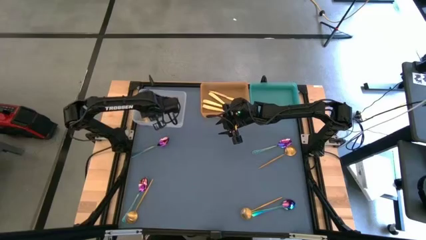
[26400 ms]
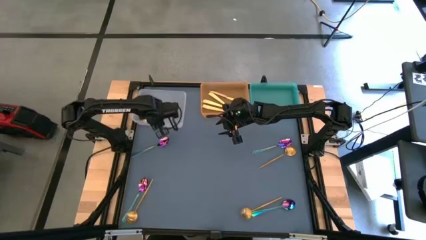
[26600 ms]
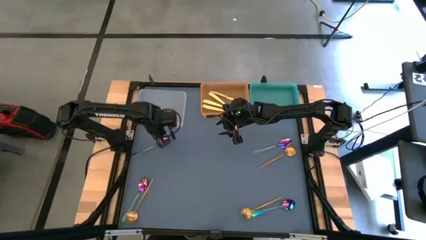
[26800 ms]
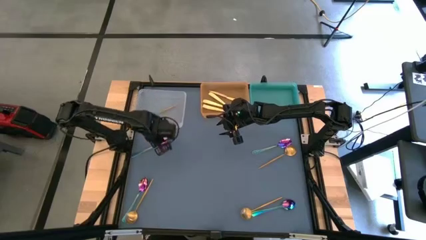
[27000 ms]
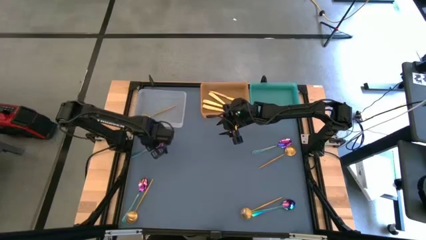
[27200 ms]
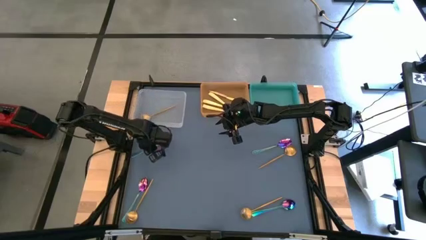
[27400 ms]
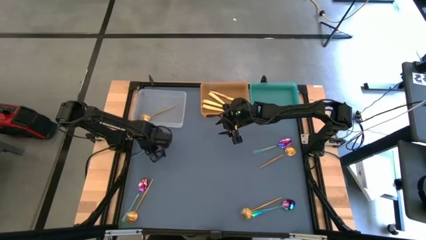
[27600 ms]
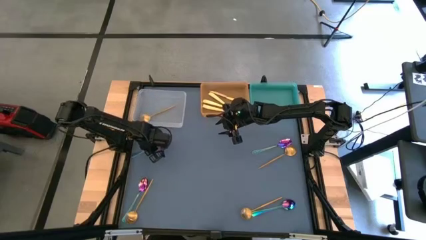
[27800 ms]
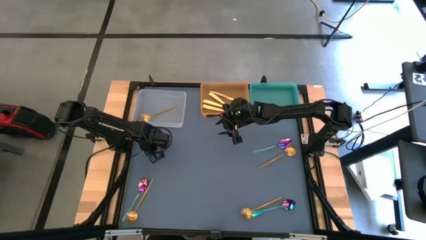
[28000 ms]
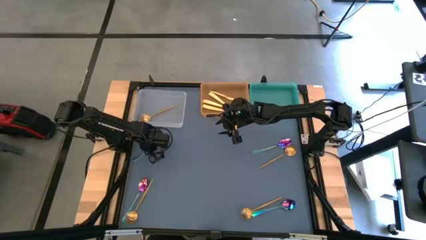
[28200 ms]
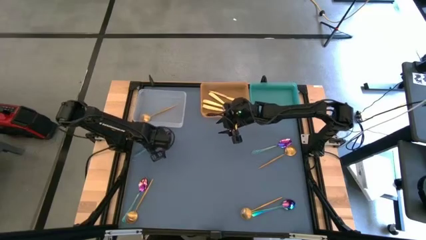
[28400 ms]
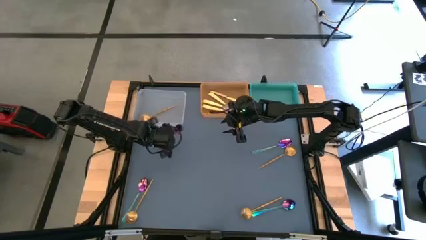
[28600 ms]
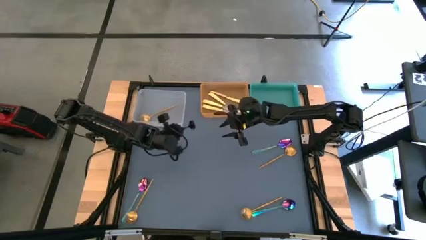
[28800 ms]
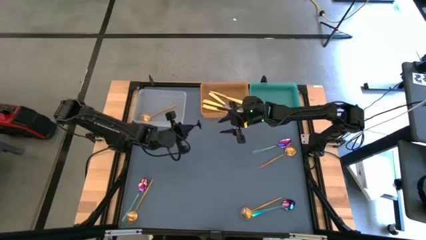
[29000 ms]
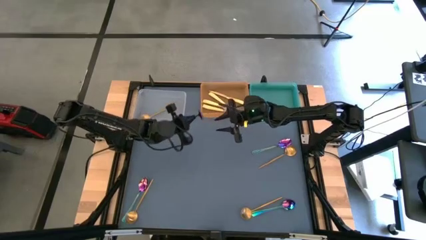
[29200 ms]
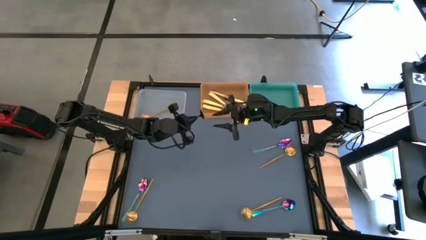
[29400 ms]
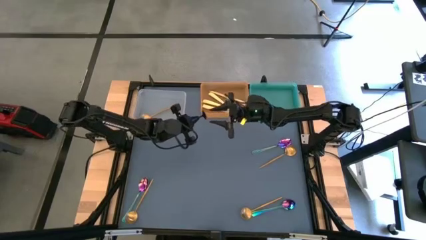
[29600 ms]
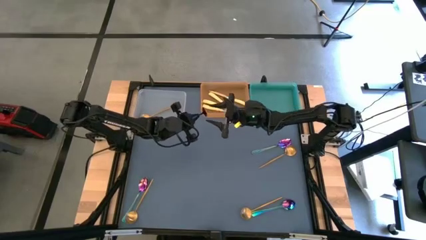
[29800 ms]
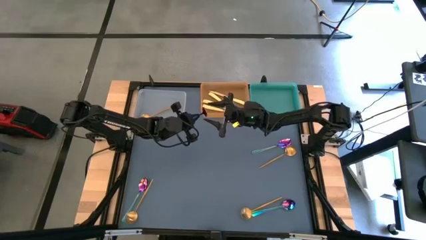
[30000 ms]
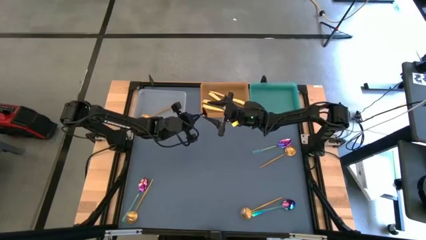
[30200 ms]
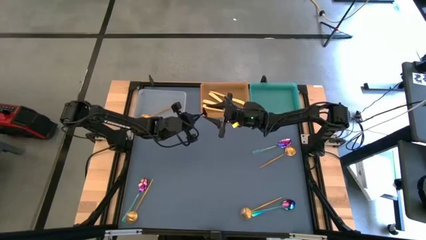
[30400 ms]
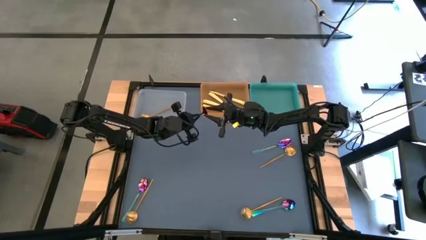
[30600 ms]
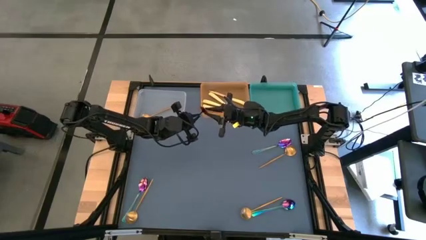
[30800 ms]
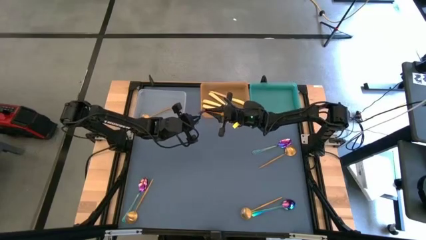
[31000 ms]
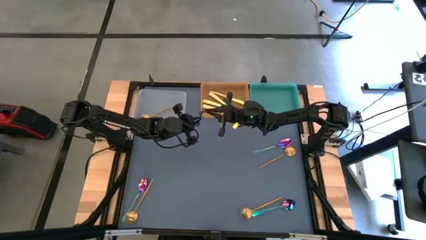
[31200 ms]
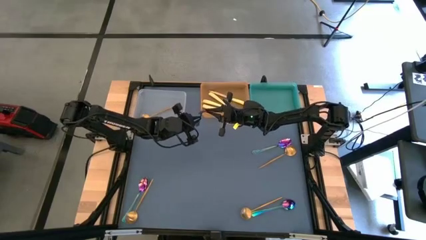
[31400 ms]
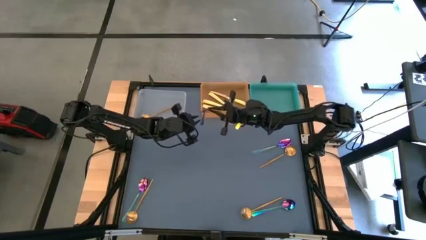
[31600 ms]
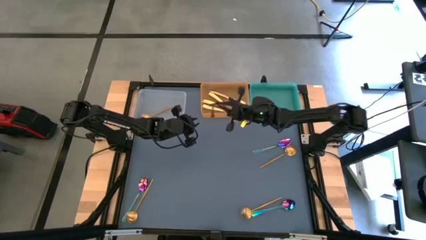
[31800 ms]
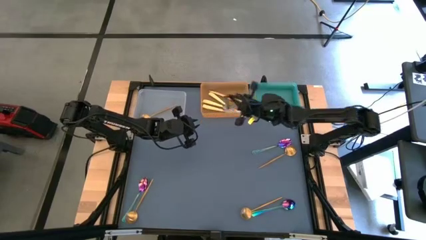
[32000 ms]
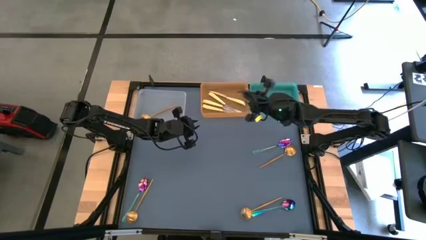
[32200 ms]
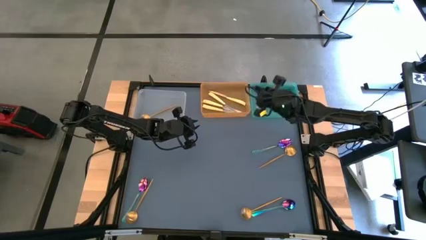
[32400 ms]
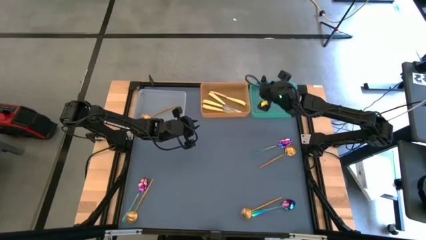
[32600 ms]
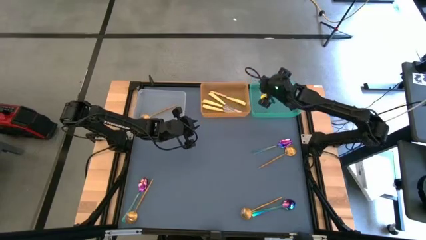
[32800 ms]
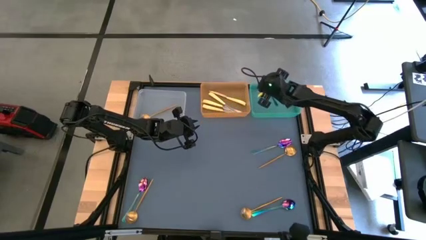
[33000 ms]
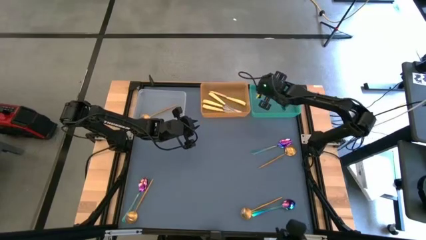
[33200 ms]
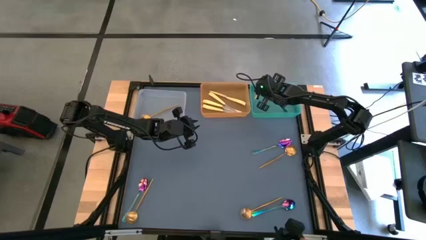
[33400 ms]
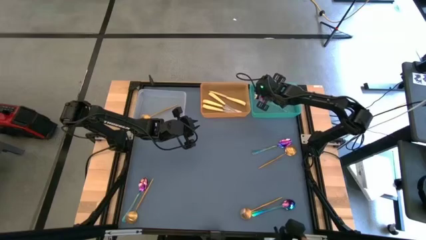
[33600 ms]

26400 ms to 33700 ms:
Task: Sort silverware by color (type)
Put the blue spoon into the blue bin

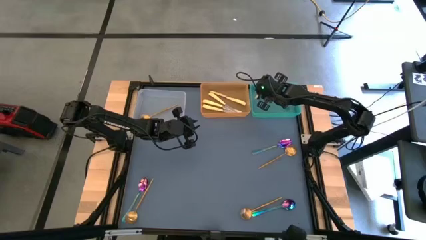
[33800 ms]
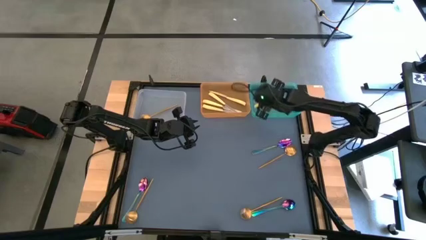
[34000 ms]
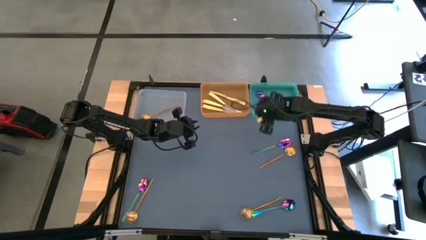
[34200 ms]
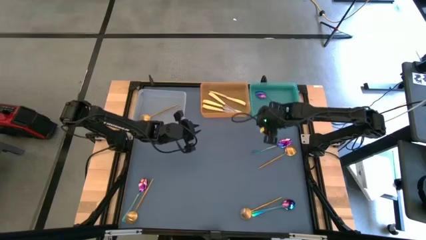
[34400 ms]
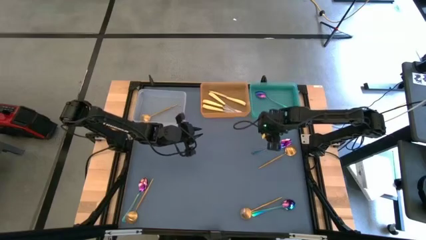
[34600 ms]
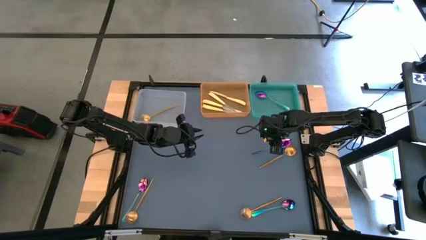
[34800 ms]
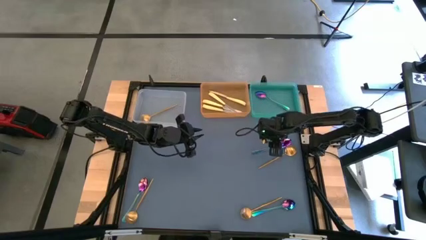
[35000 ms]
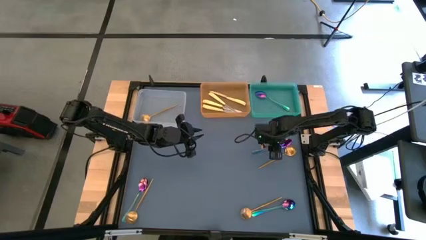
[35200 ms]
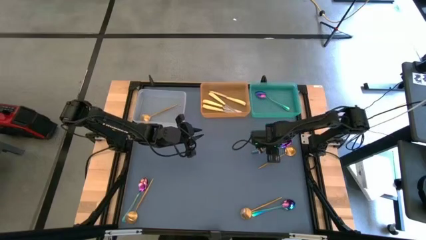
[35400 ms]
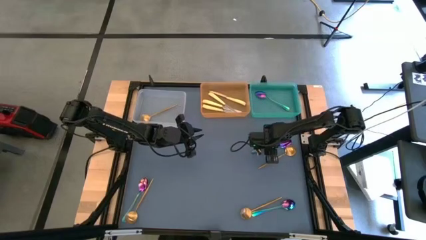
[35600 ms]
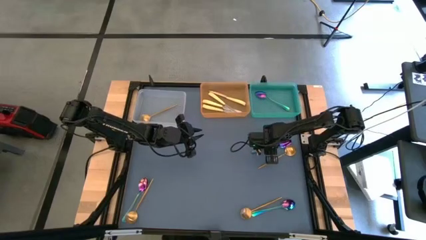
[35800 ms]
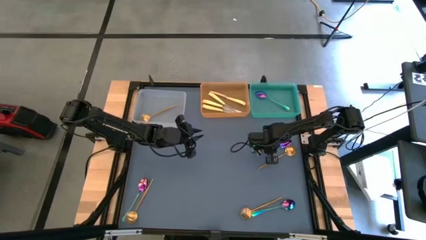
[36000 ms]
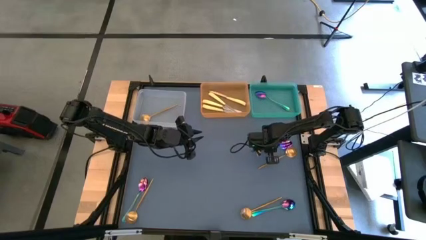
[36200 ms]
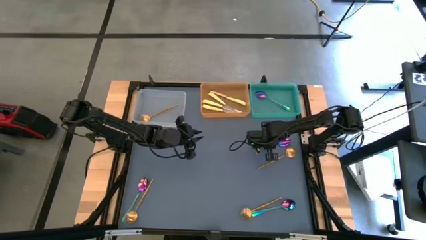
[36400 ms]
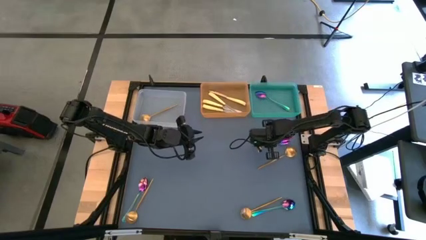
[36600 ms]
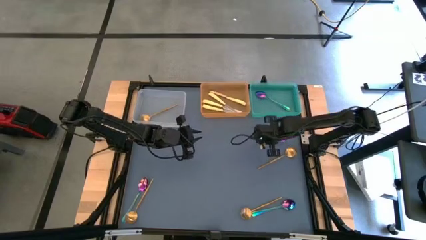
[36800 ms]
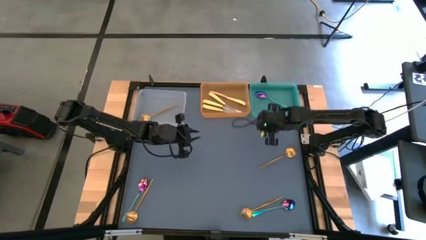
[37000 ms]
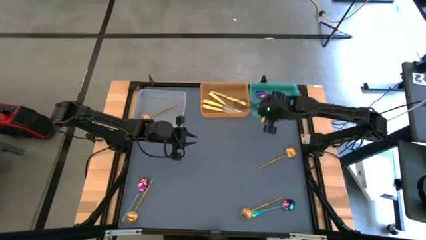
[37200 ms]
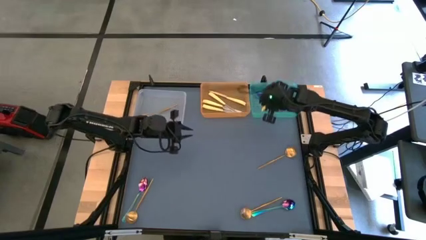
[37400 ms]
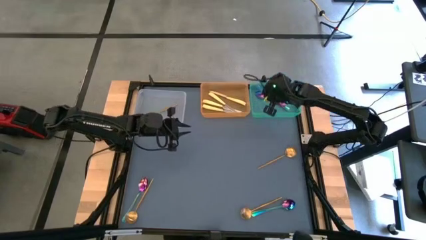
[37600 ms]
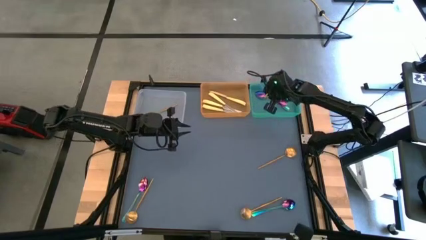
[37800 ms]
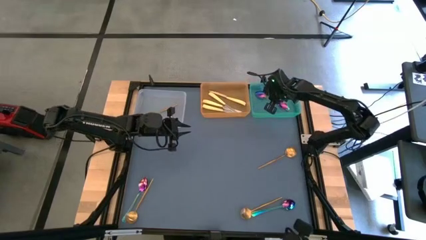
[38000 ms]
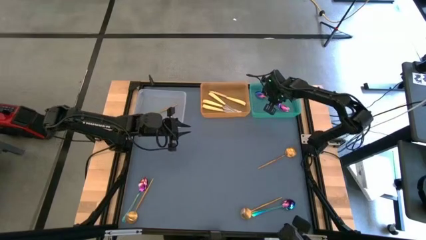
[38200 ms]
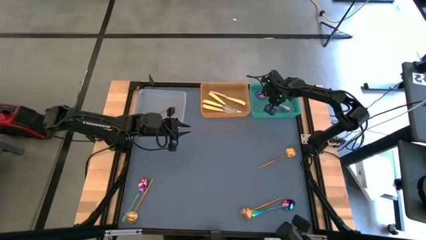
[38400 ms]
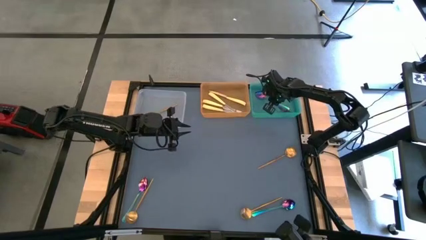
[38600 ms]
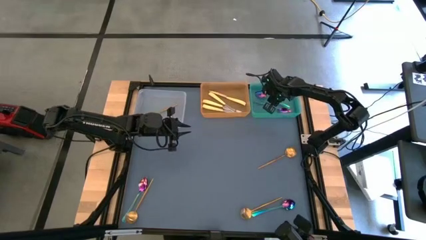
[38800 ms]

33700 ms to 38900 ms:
Put the blue spoon into the blue bin

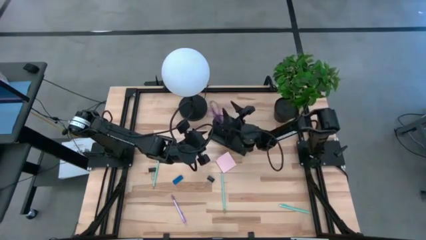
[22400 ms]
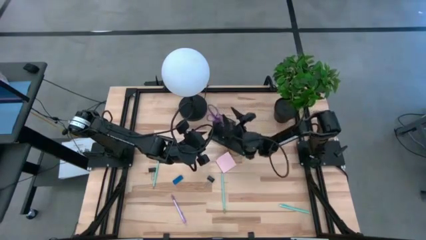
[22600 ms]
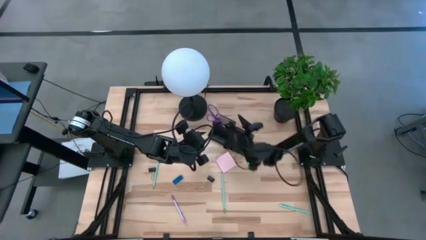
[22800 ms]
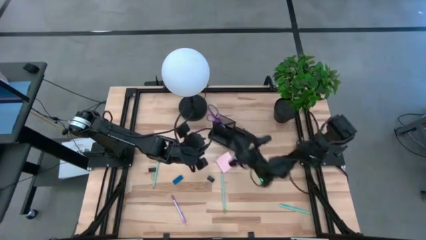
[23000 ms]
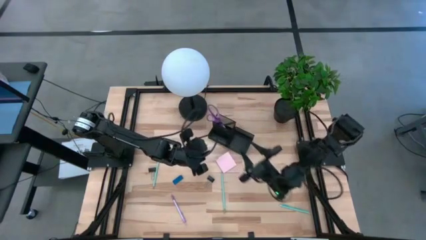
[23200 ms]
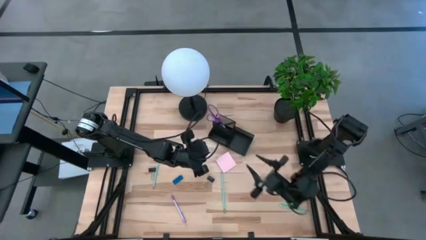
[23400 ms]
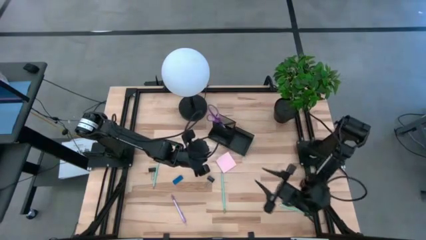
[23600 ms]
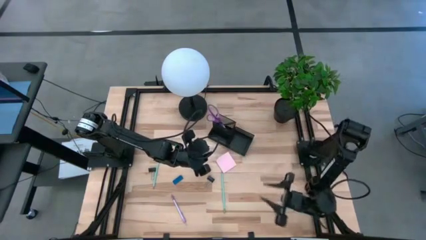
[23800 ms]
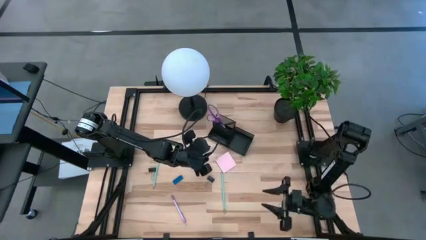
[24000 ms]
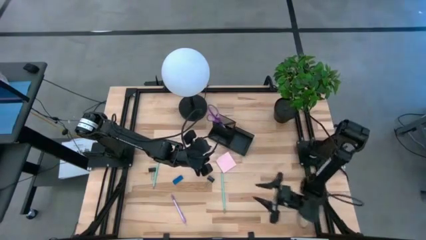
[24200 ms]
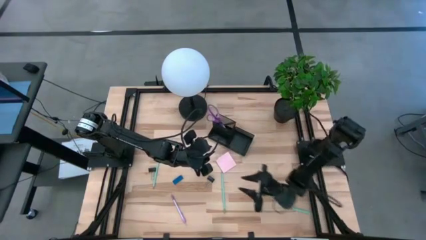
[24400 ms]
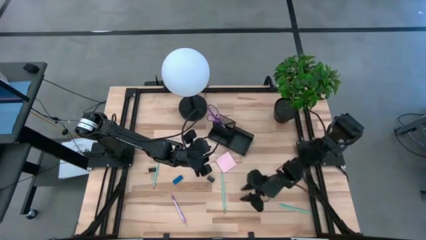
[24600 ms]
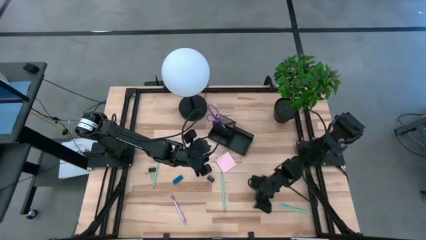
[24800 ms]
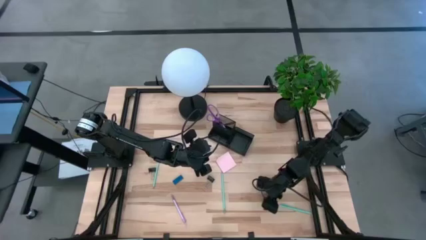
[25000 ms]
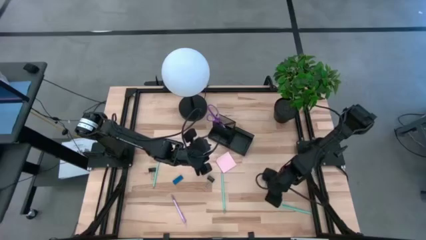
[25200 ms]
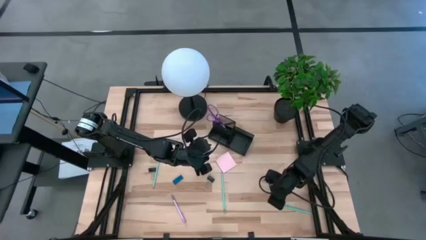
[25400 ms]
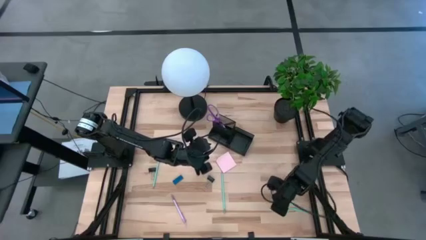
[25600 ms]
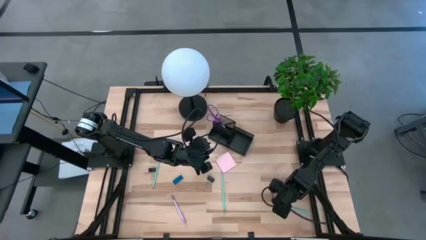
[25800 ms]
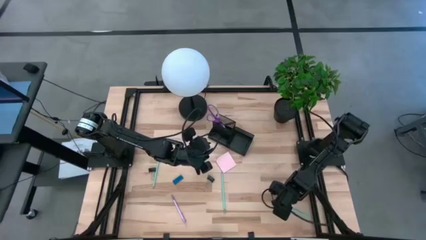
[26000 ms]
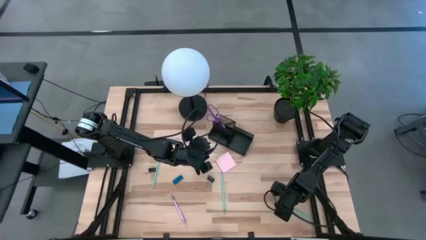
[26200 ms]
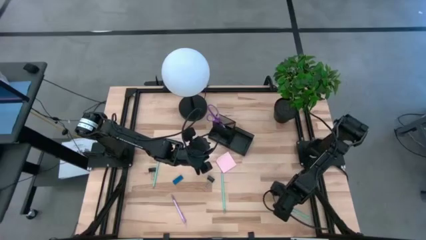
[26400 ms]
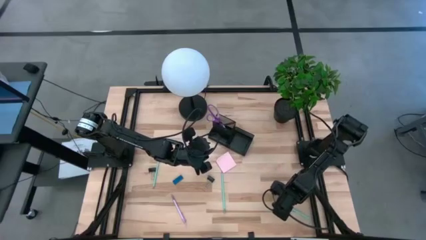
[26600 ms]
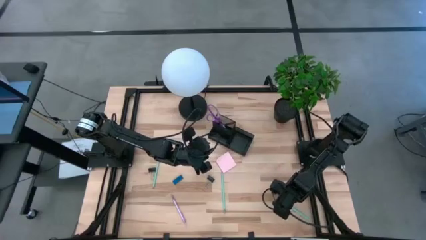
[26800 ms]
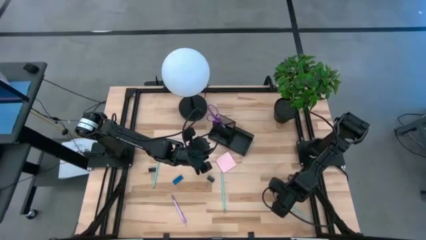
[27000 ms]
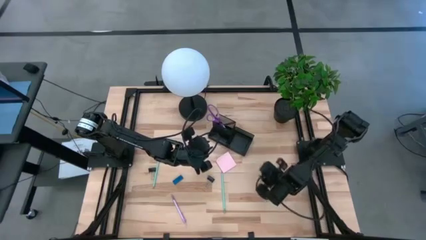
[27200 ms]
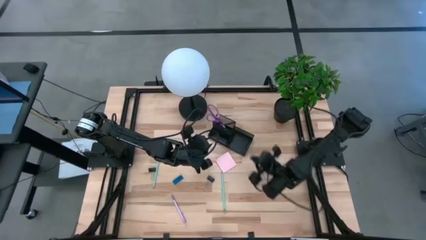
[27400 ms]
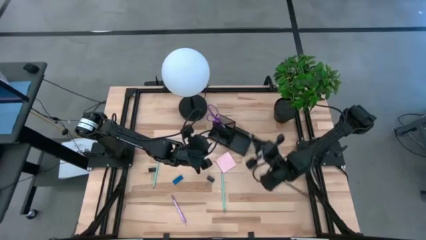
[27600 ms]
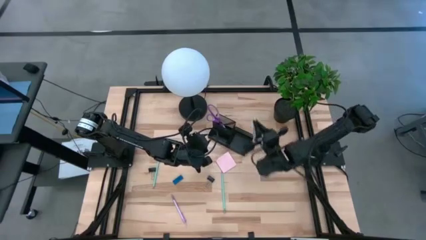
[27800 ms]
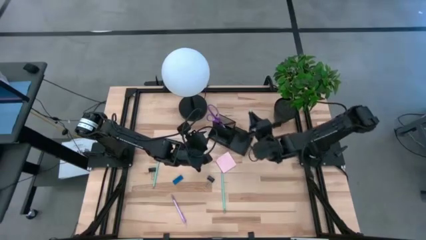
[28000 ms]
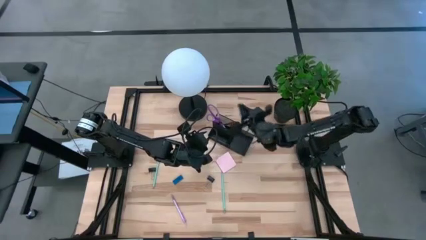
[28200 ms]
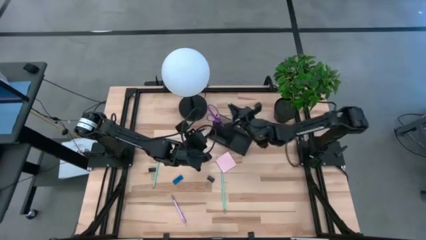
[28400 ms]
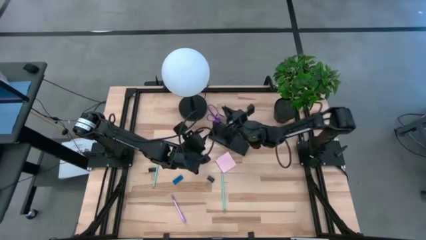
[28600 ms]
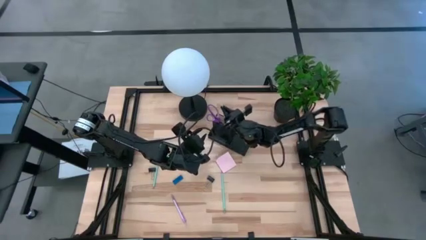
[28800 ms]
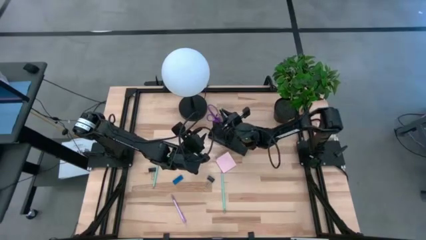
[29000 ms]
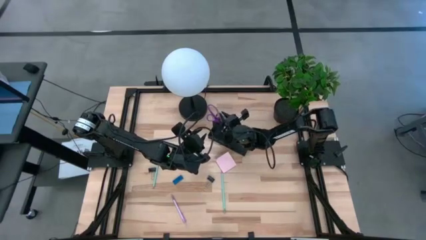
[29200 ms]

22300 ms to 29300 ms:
Task: Pick and place office supplies into organizer
Put the blue pen into the desk organizer
